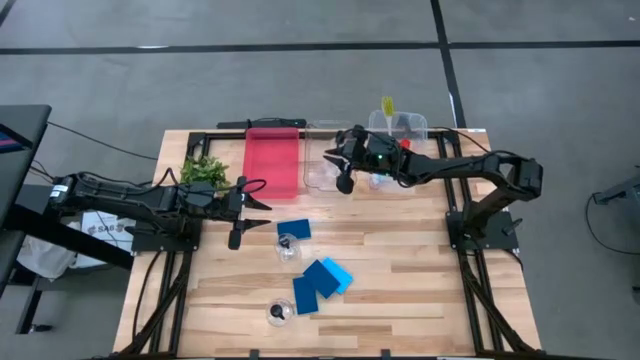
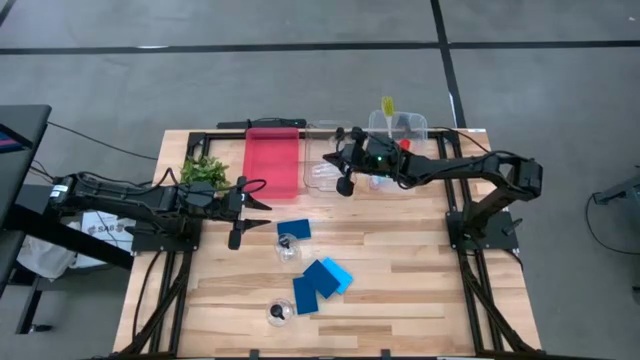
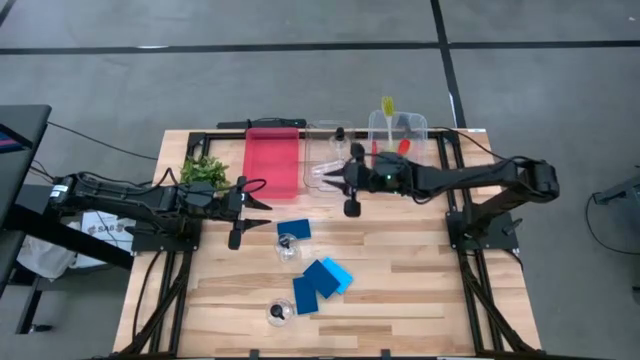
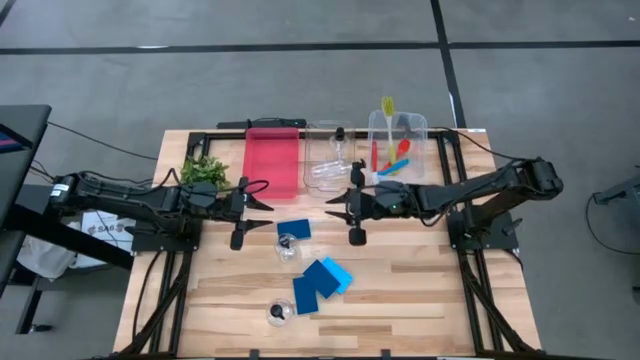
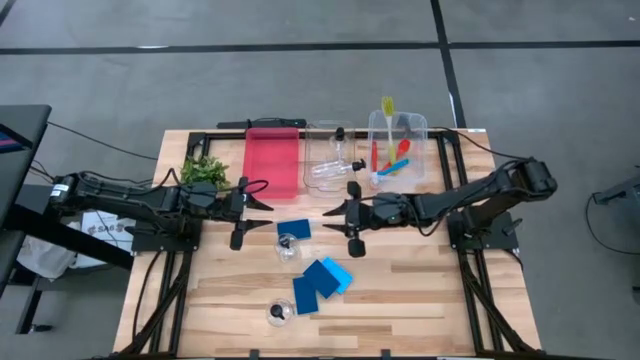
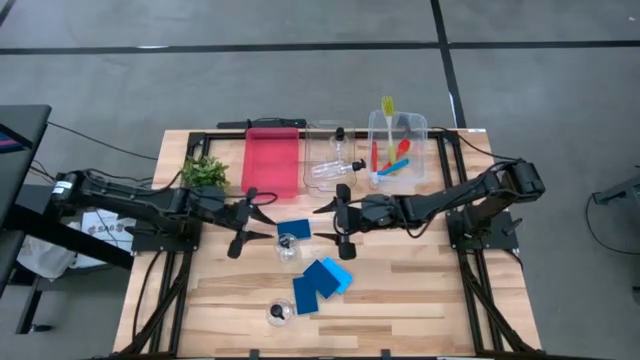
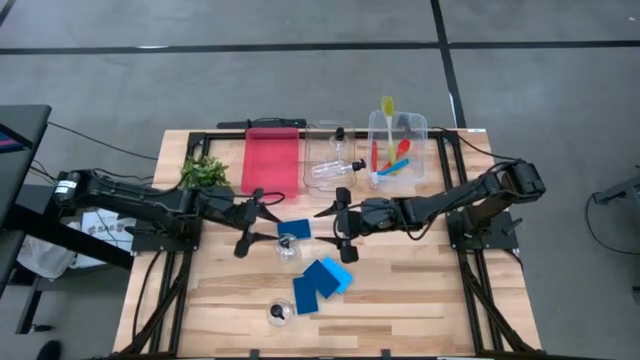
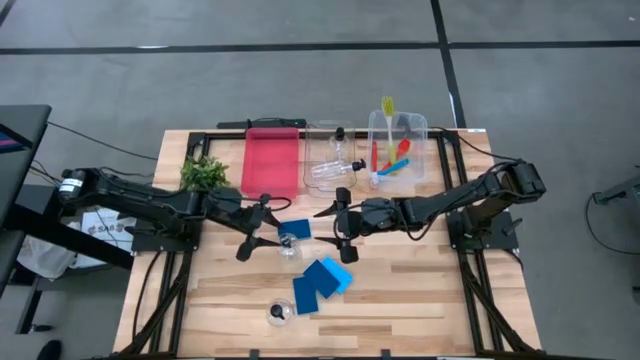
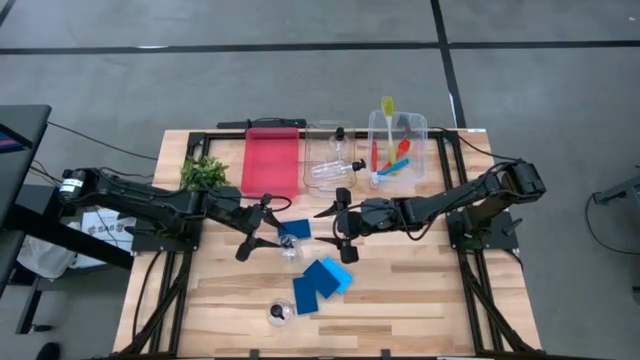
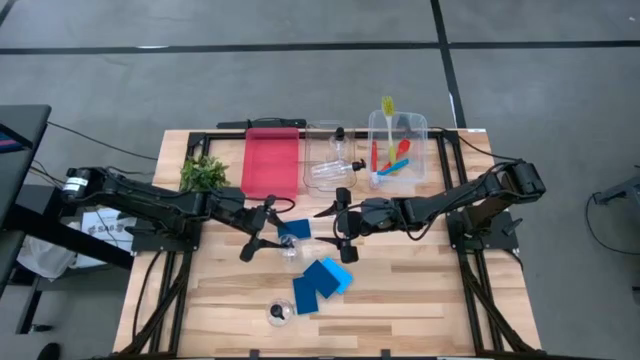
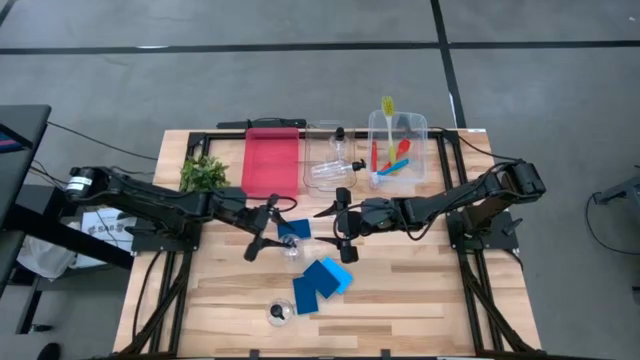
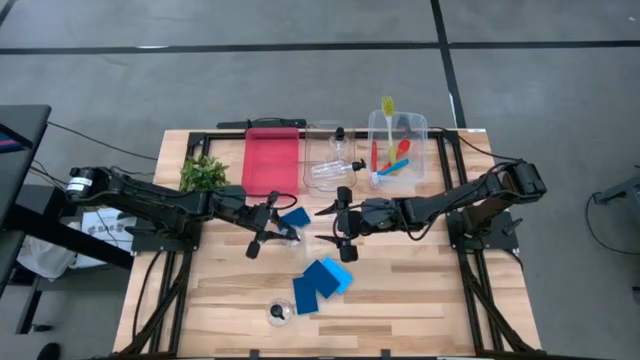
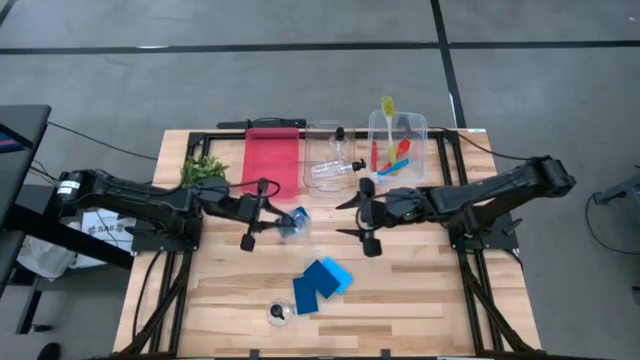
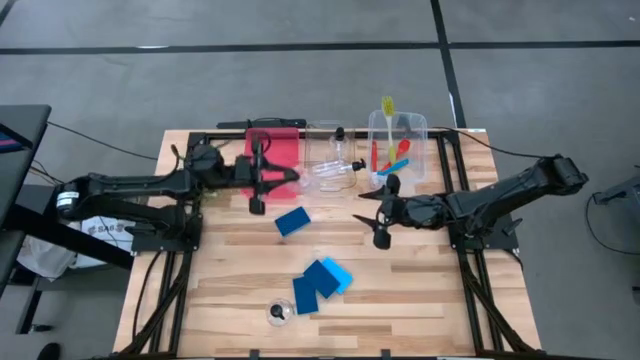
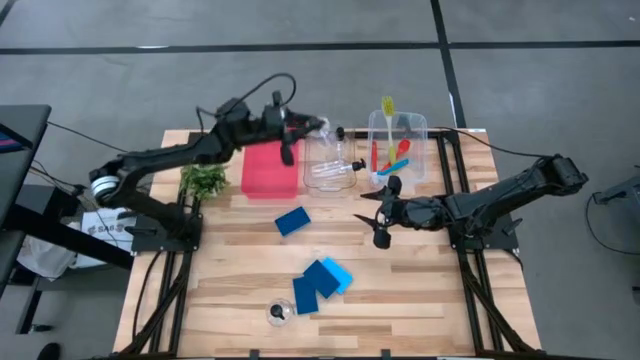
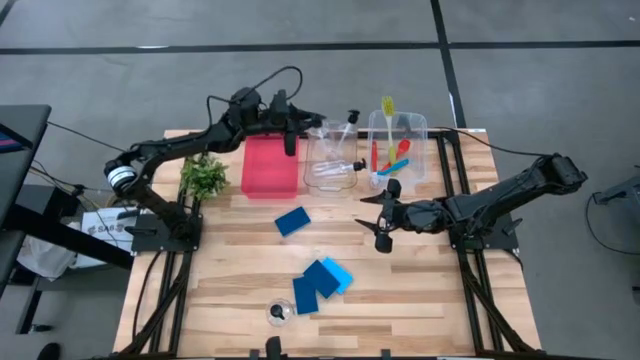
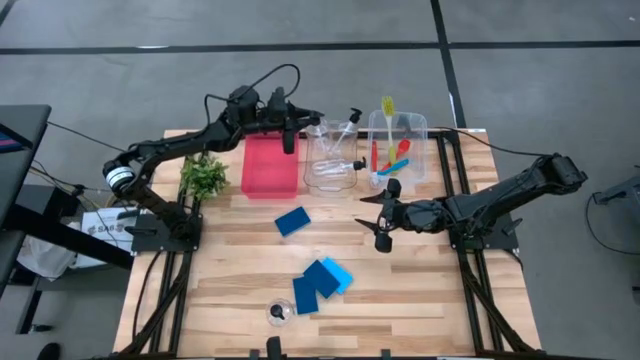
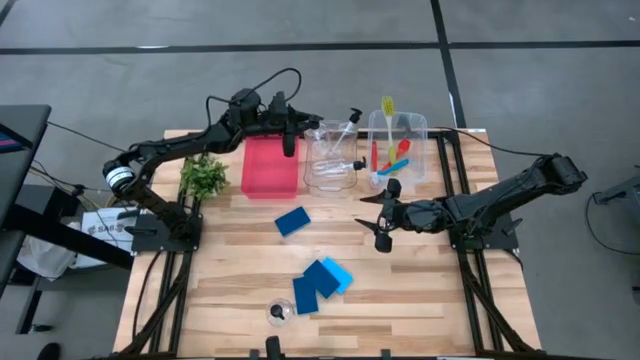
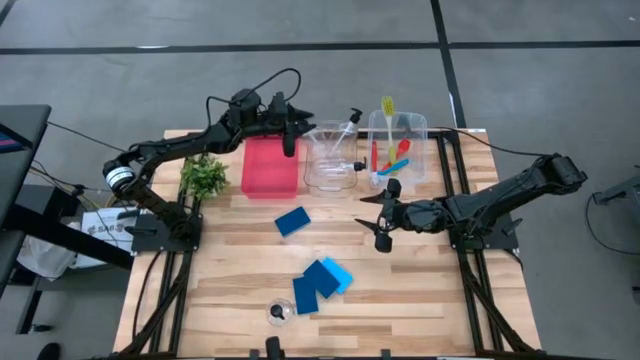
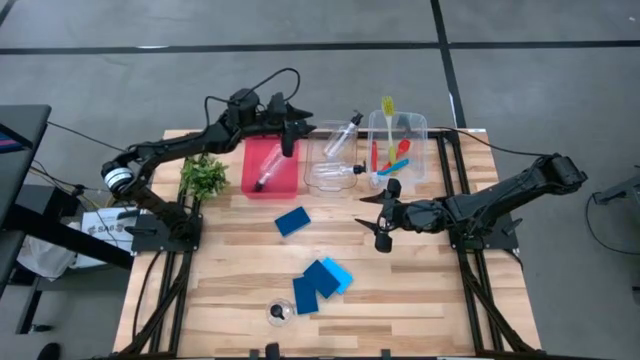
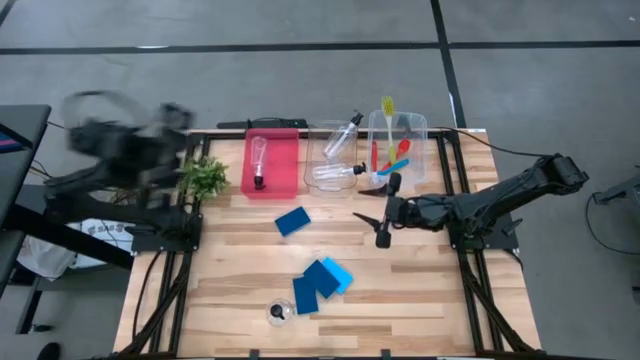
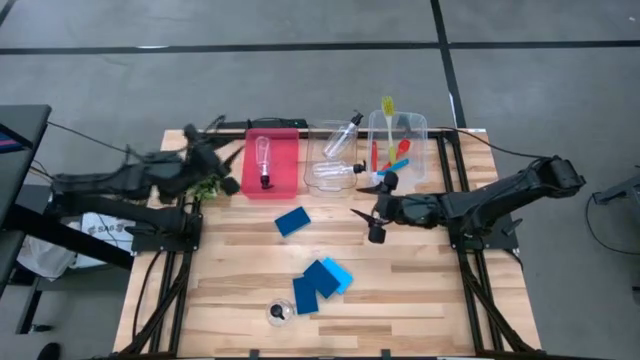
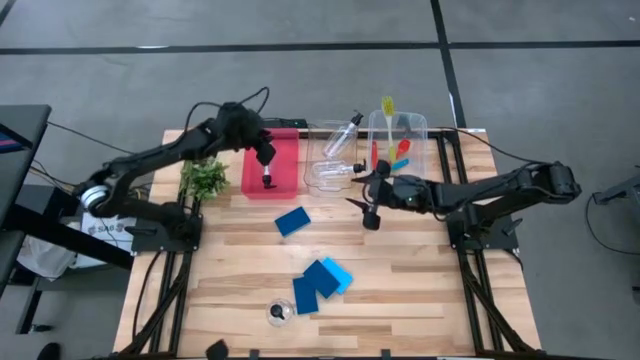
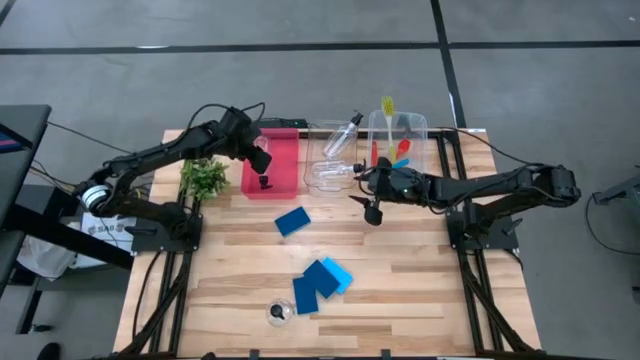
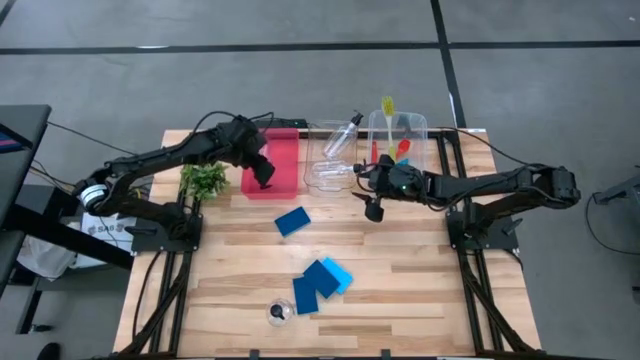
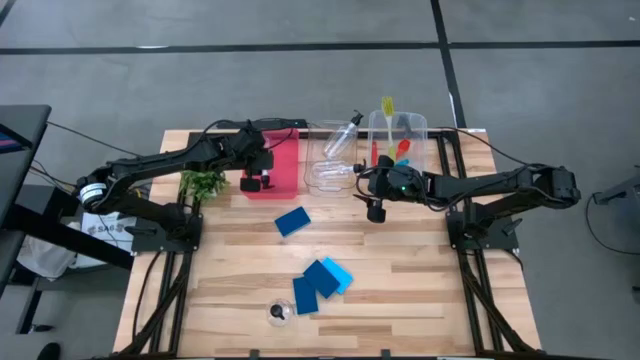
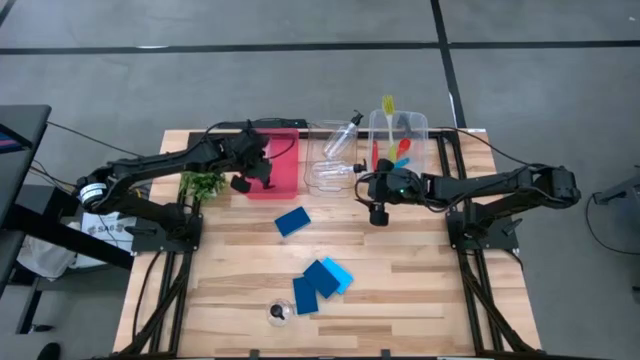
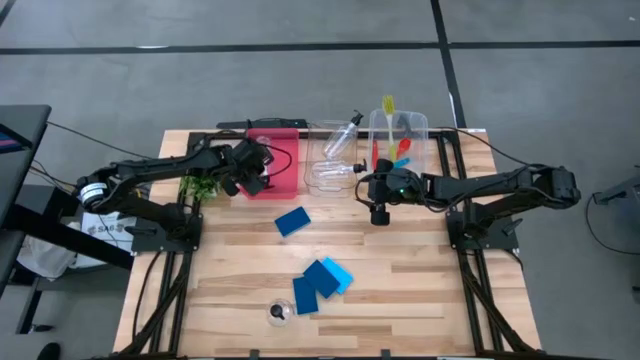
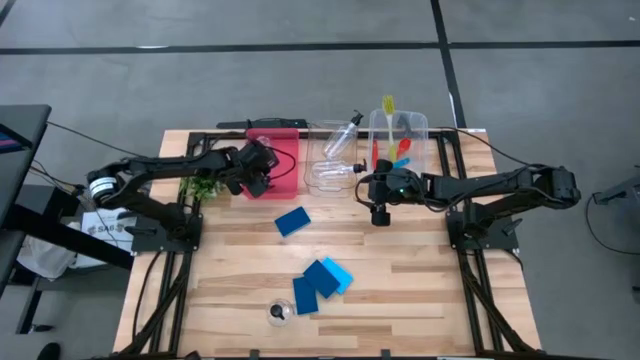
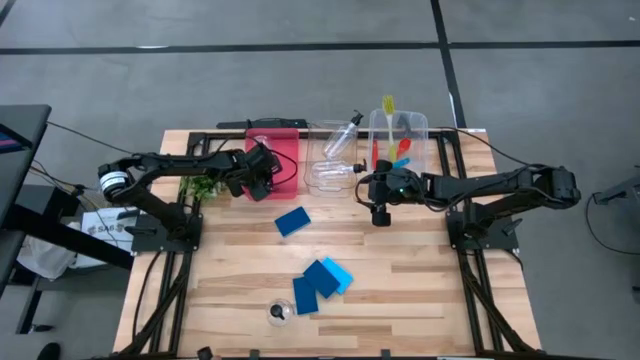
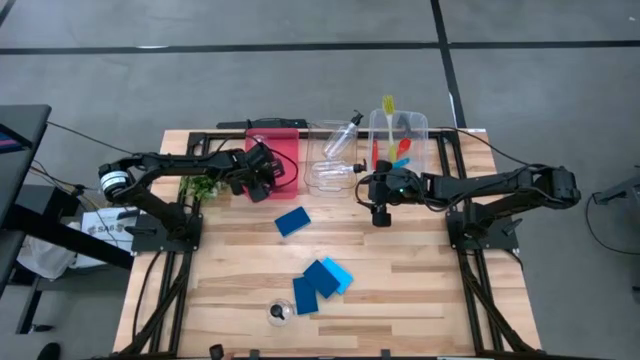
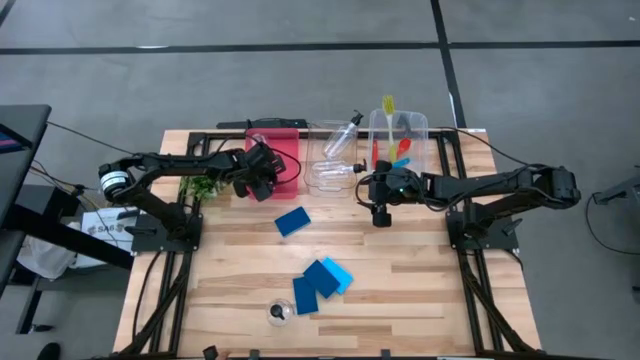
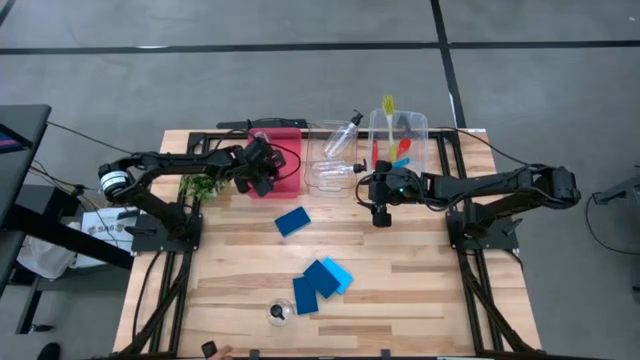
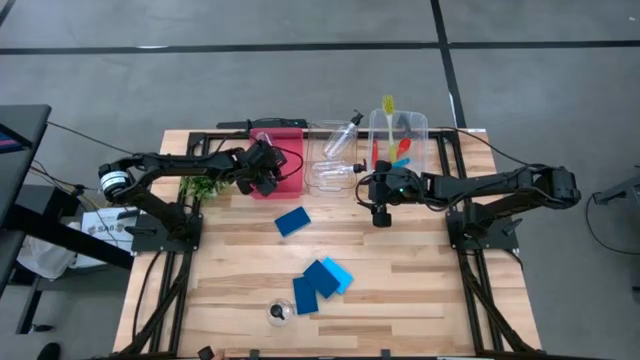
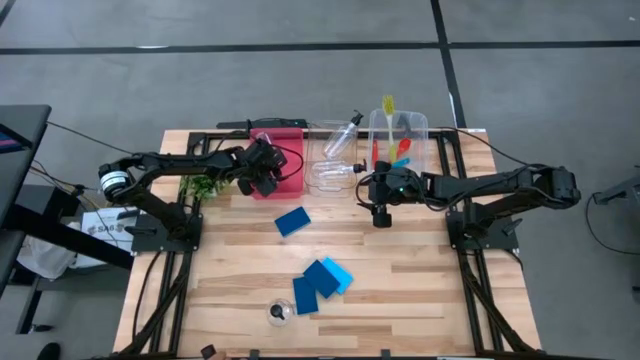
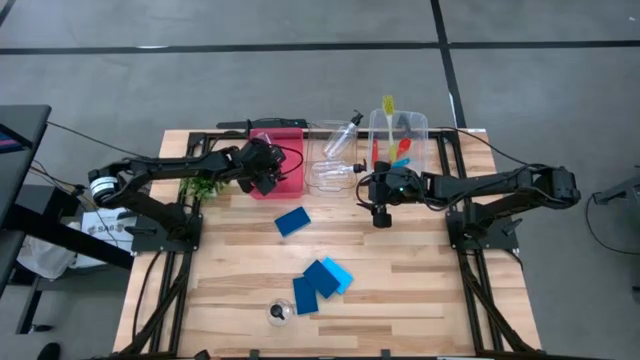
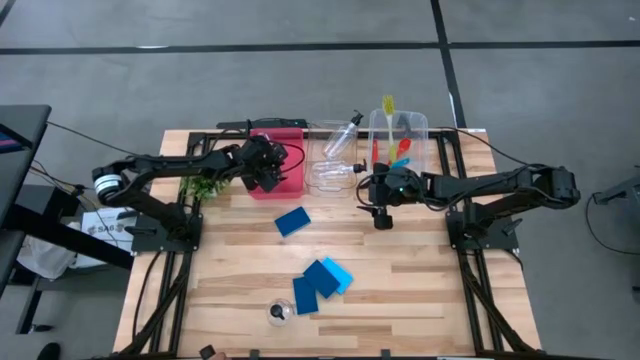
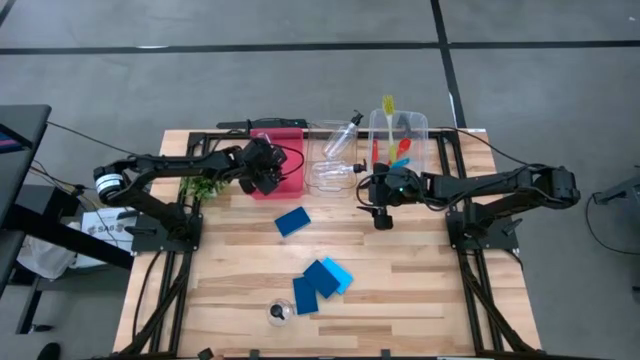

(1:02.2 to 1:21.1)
Task: Pick & Place Kitchen Sink Supplies
Put the soap dispenser into the left transparent bin
